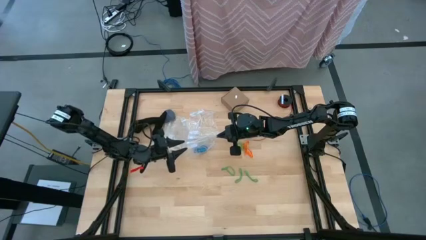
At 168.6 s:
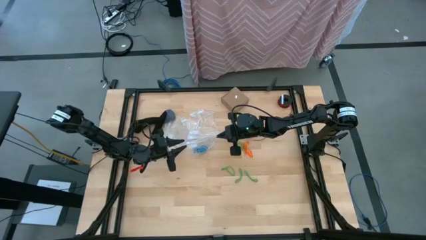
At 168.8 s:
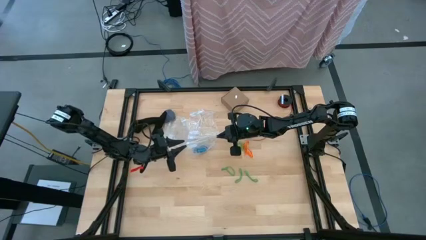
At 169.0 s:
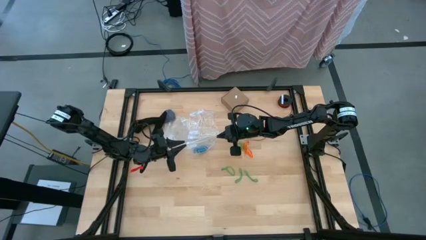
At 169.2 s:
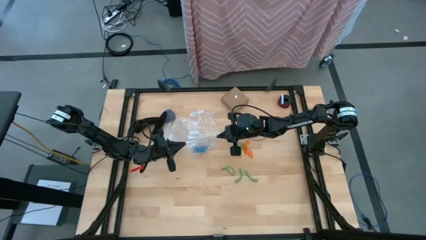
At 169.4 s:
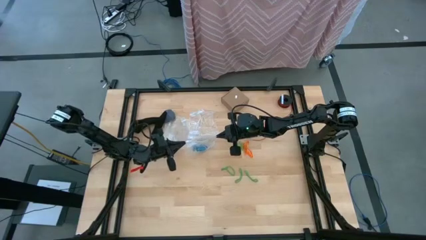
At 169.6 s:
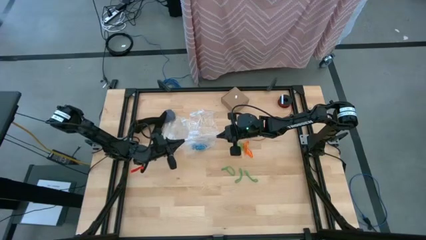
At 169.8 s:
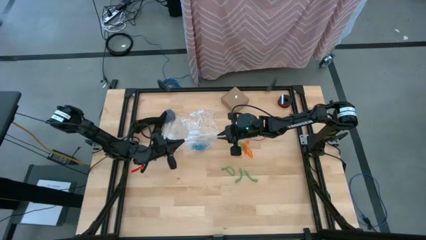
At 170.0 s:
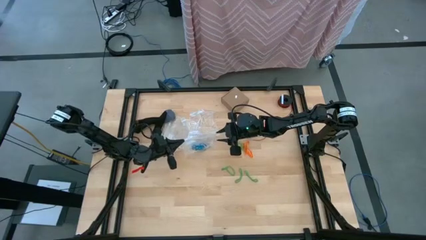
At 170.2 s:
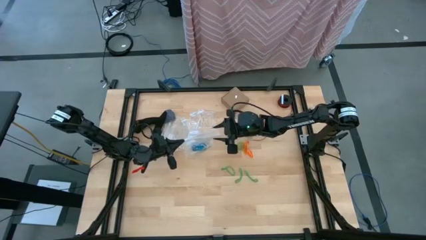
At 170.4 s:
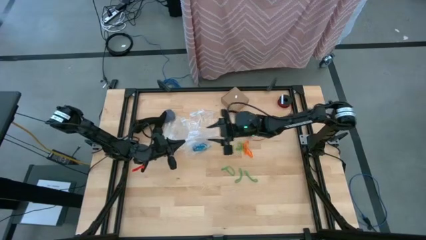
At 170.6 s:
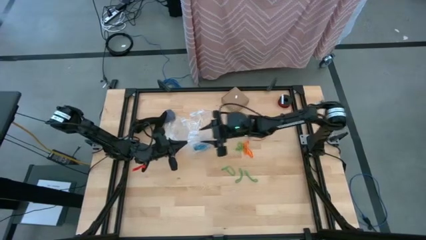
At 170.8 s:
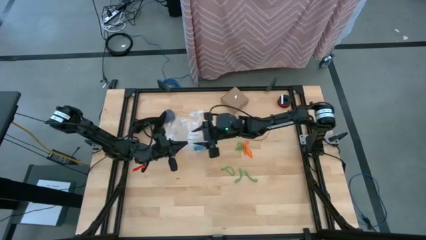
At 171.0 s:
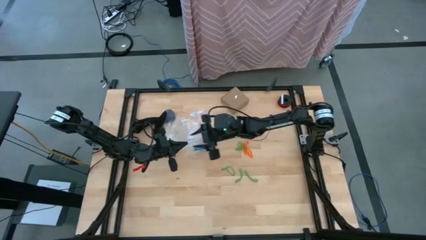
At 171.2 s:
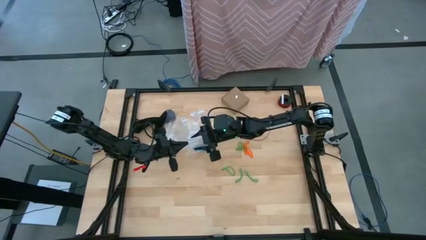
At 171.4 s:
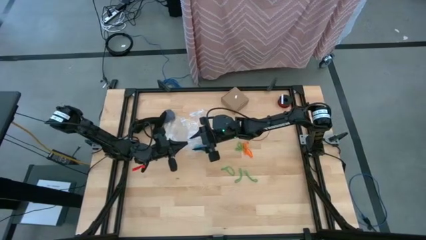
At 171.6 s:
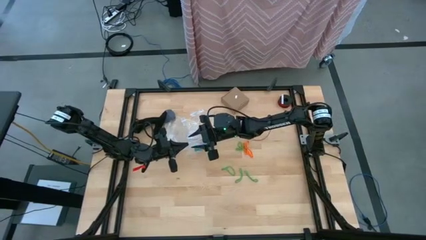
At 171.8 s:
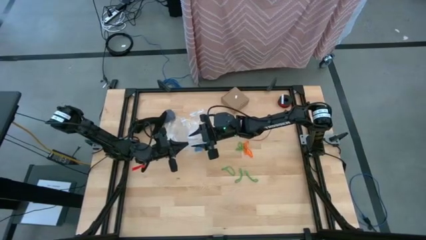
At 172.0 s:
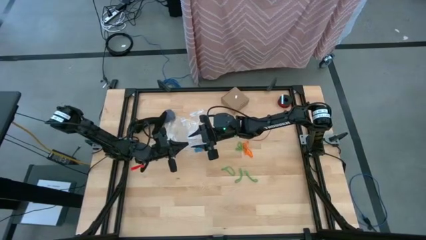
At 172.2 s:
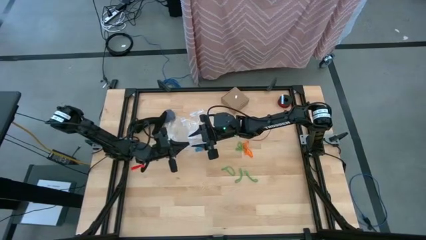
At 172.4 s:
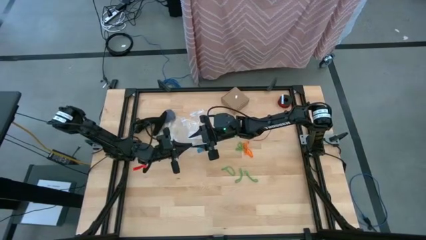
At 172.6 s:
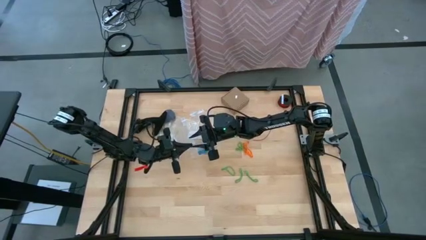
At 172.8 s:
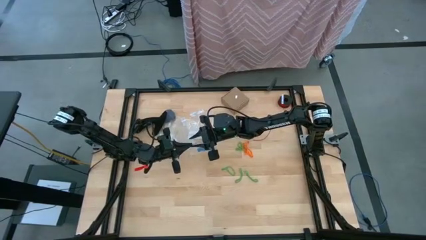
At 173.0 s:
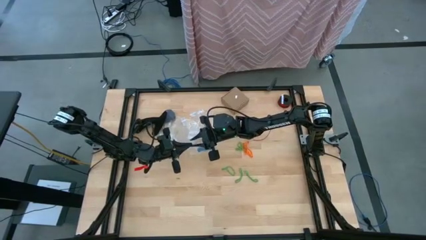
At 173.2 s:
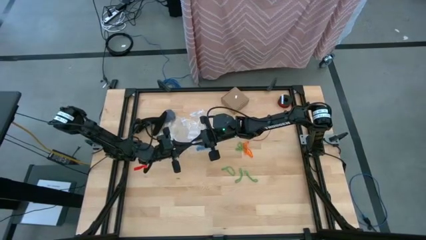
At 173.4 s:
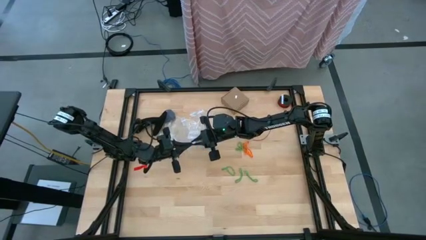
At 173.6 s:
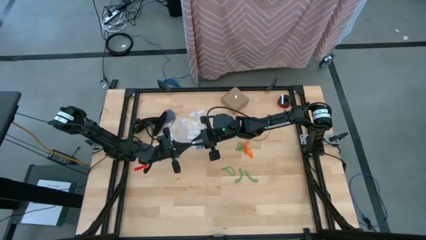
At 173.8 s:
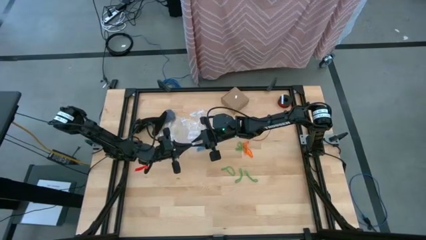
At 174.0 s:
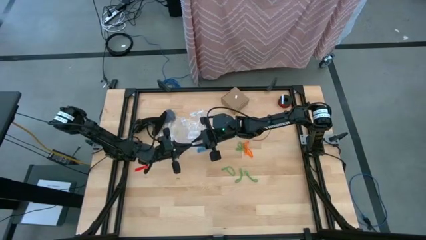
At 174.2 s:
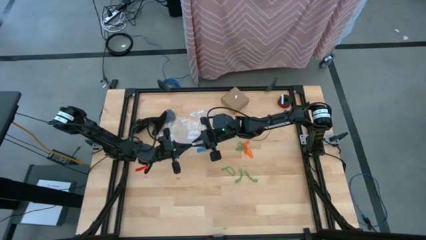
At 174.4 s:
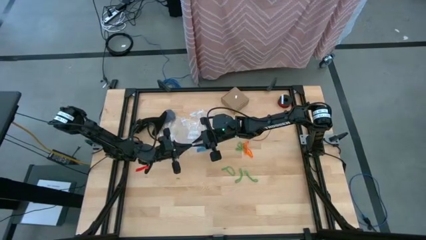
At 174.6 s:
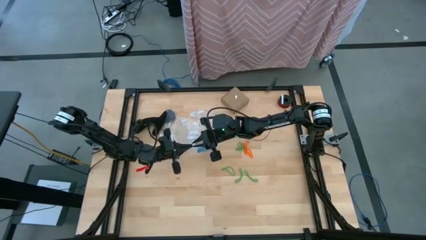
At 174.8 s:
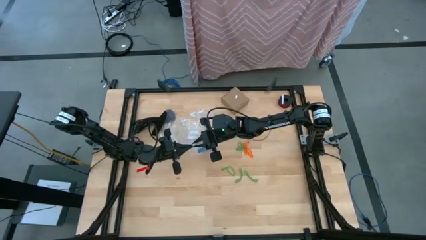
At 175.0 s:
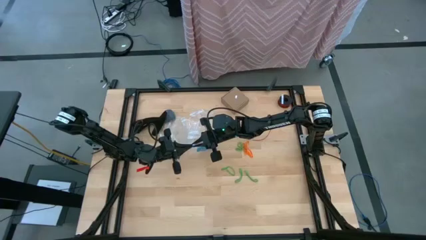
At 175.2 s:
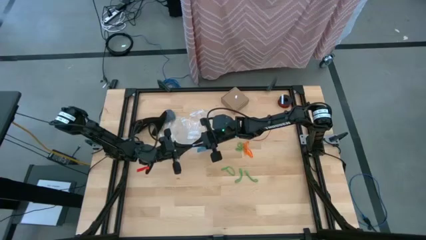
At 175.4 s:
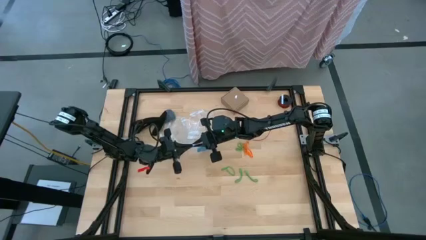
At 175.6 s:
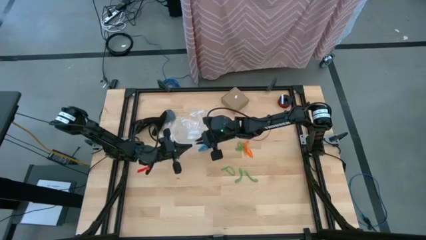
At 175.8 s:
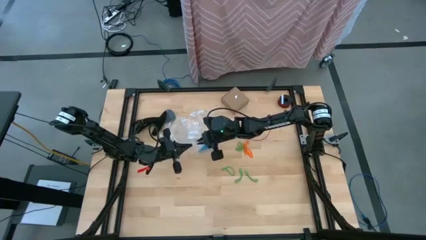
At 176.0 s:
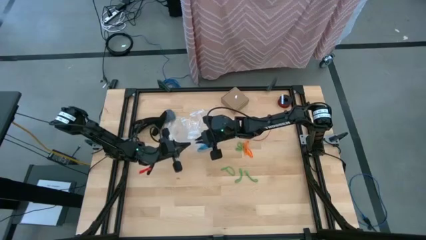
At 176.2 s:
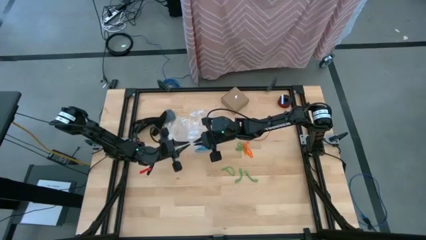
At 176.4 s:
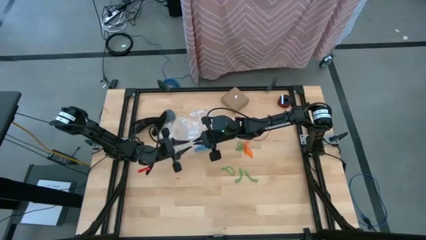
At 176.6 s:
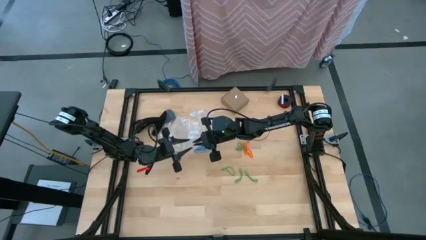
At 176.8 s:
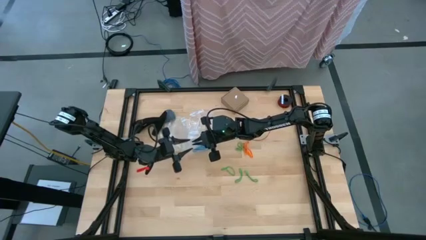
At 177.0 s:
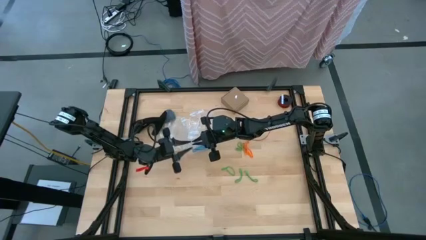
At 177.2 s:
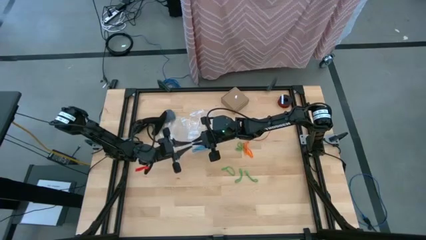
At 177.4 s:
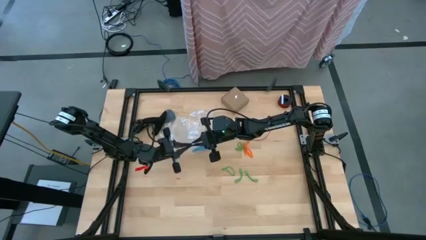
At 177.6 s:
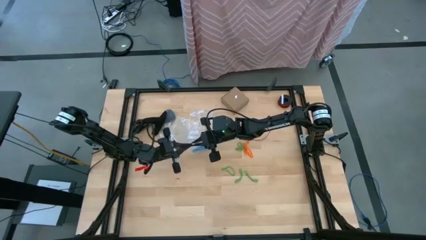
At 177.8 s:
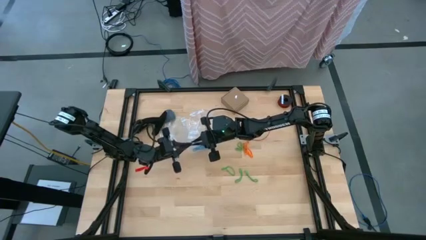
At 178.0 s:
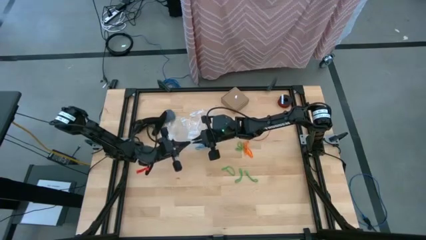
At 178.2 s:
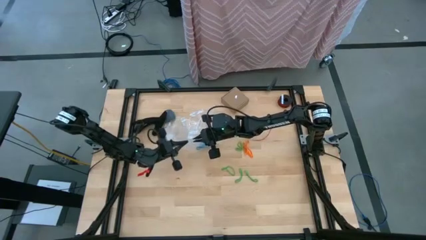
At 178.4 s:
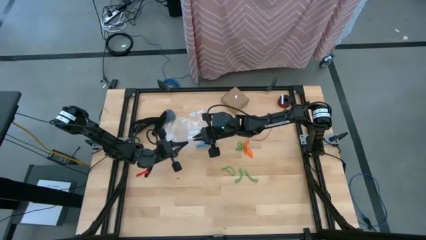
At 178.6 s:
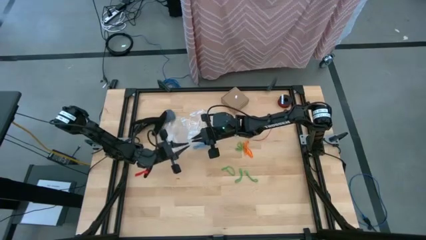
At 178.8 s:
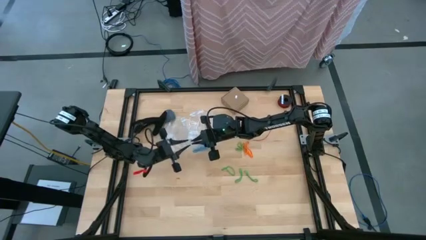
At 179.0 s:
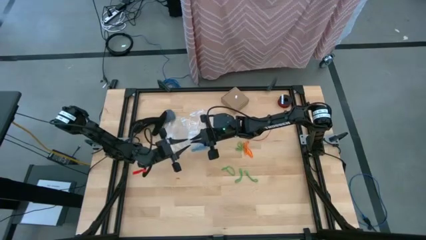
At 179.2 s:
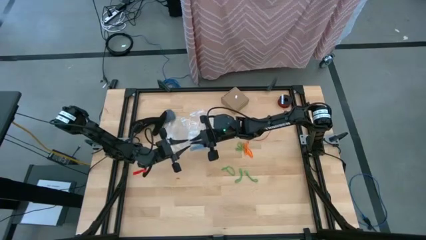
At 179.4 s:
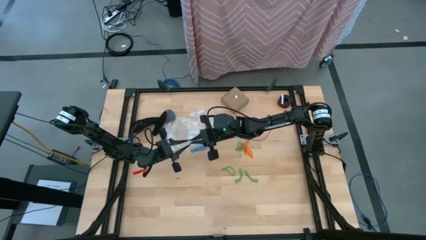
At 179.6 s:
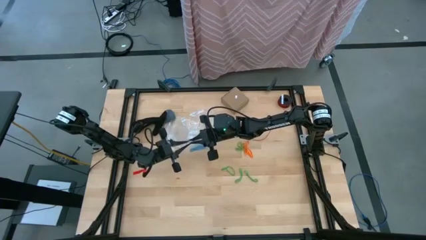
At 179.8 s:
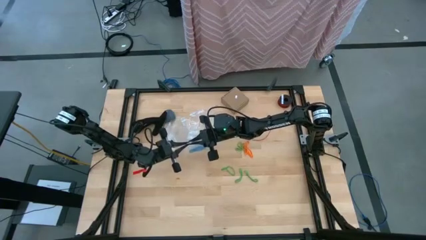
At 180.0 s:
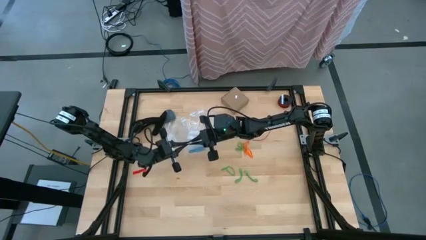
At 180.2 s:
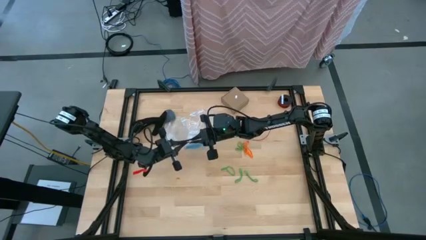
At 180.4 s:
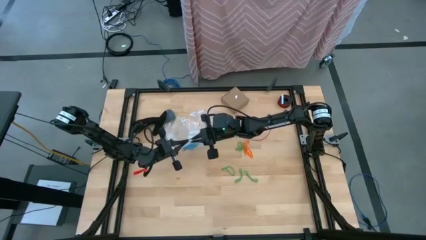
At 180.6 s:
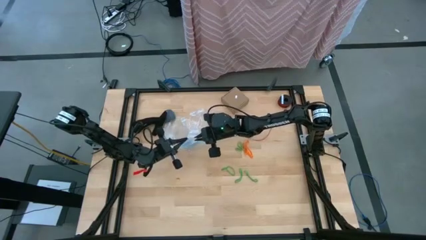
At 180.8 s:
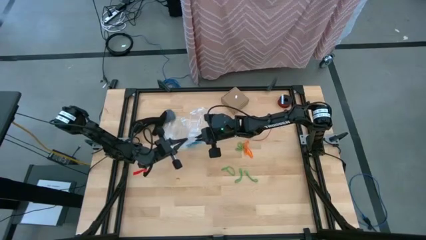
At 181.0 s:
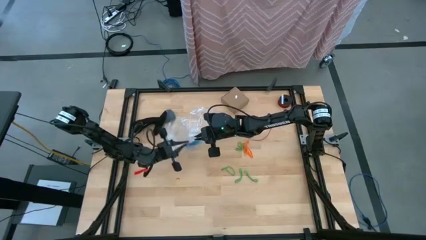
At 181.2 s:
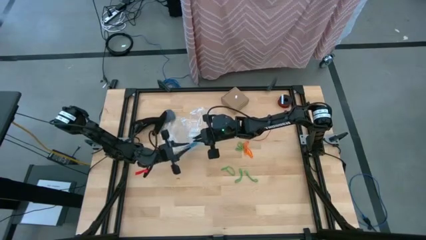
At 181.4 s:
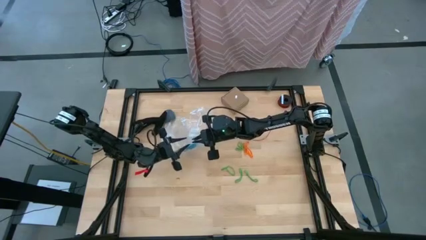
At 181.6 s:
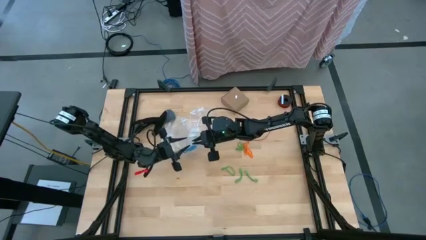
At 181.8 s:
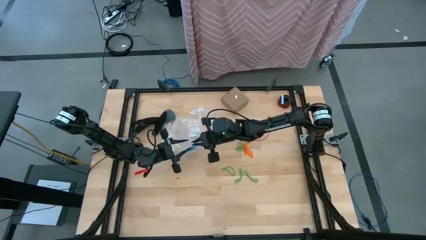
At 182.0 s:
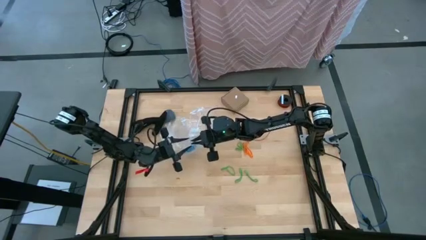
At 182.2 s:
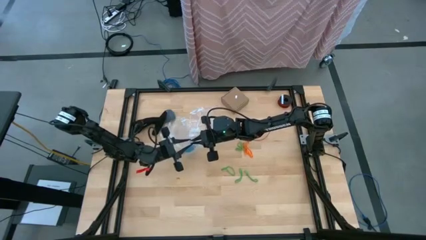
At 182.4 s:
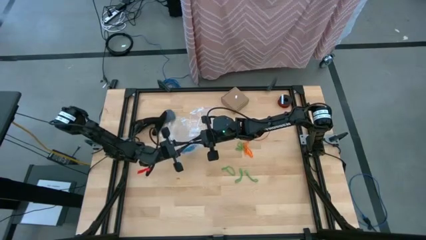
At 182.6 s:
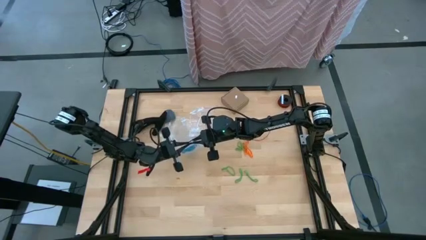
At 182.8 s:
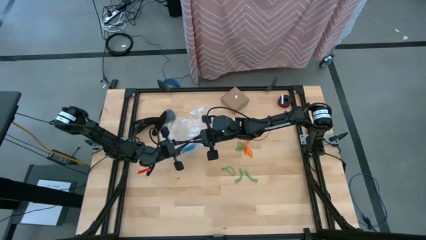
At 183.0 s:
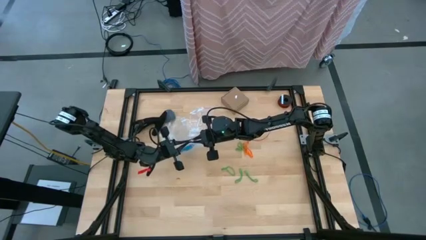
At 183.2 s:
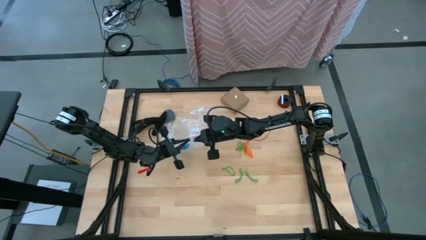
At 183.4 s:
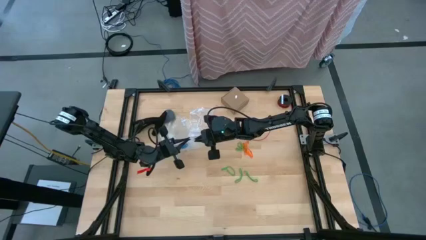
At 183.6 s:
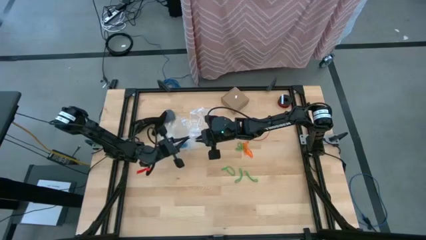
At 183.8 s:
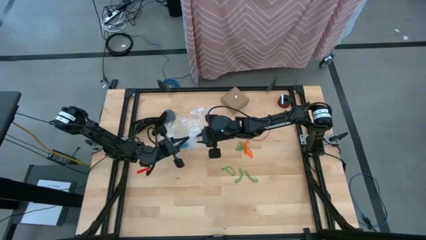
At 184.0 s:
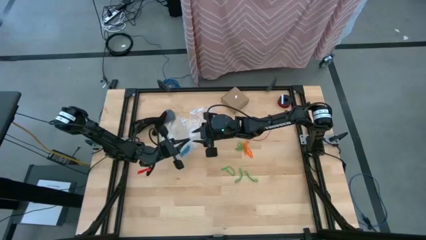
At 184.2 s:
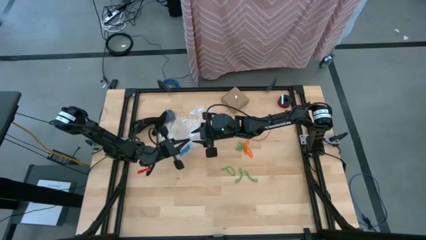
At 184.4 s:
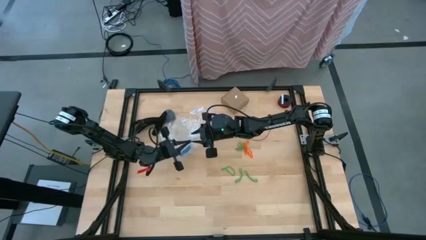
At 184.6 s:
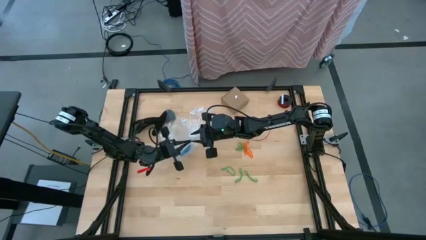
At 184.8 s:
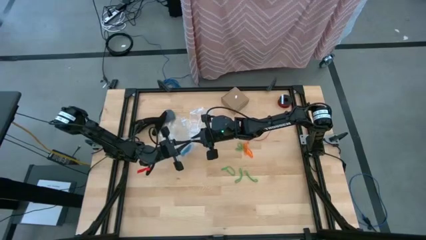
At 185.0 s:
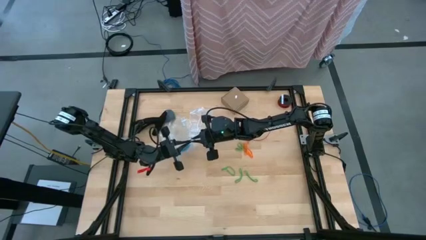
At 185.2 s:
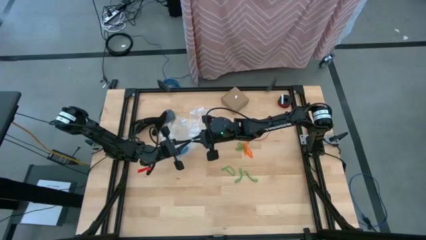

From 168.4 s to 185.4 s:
Task: Sort rubber bands
Close the transparent zip bag
